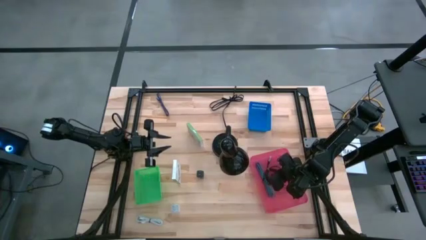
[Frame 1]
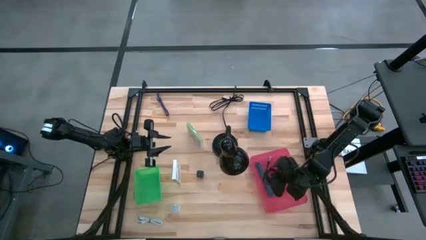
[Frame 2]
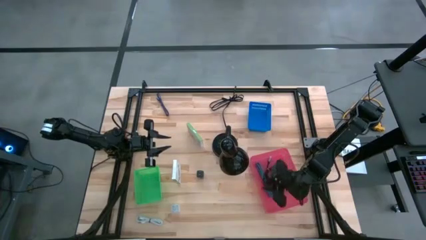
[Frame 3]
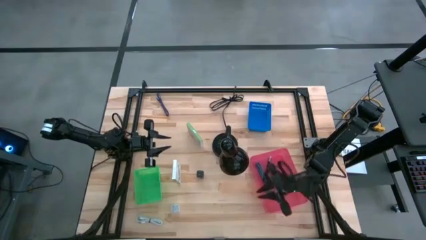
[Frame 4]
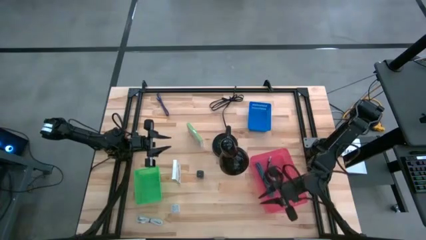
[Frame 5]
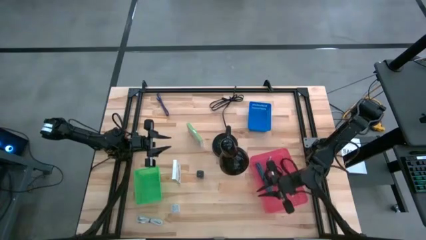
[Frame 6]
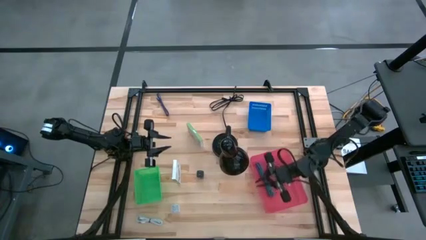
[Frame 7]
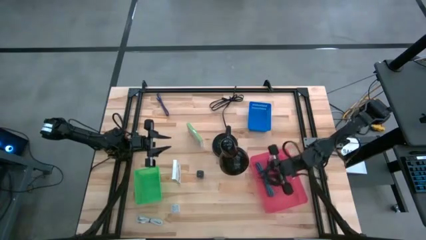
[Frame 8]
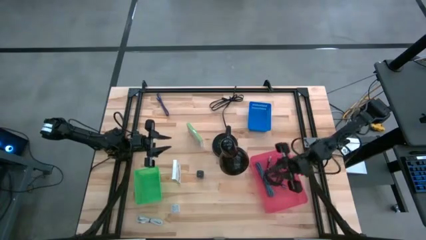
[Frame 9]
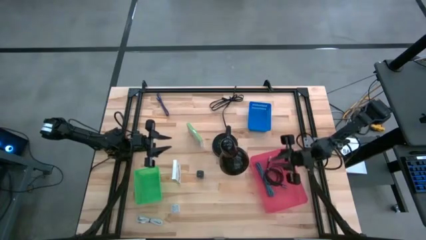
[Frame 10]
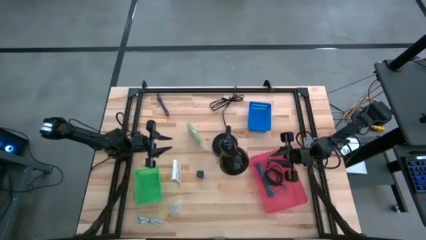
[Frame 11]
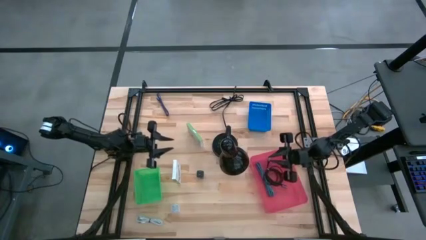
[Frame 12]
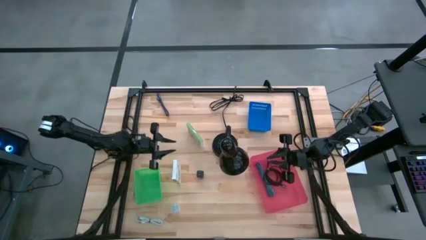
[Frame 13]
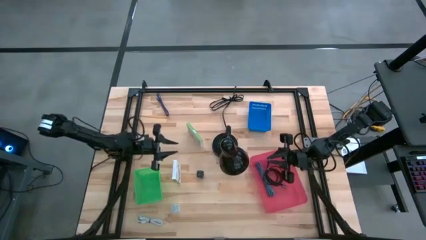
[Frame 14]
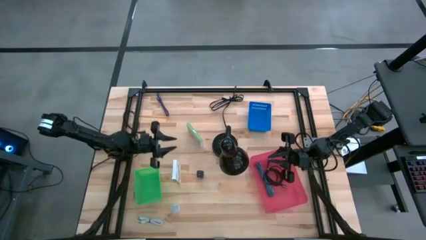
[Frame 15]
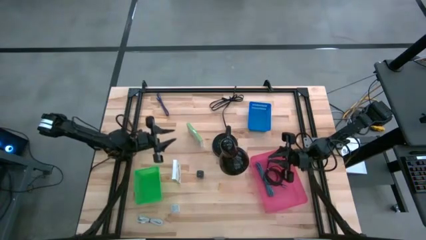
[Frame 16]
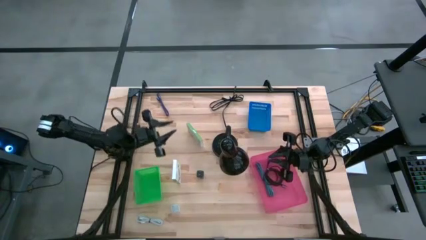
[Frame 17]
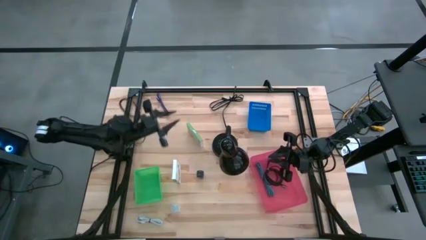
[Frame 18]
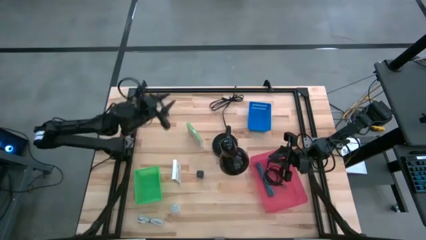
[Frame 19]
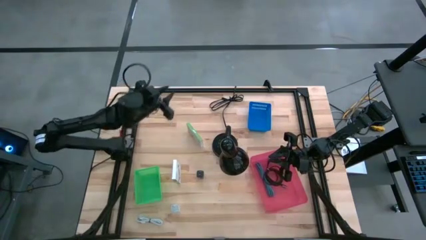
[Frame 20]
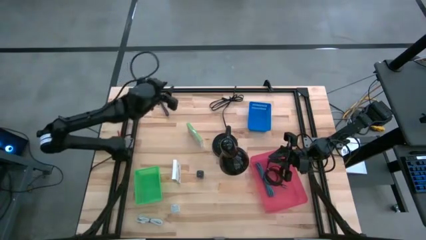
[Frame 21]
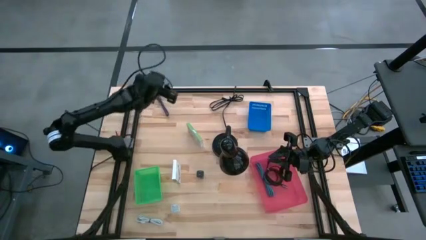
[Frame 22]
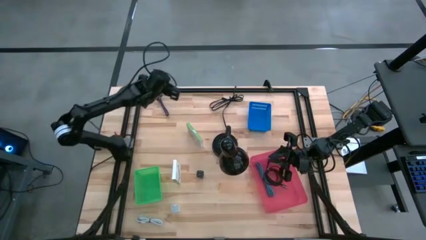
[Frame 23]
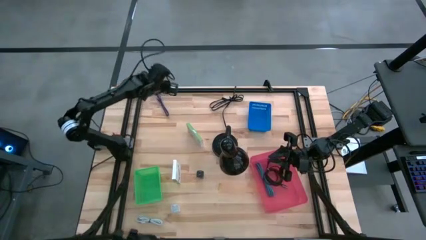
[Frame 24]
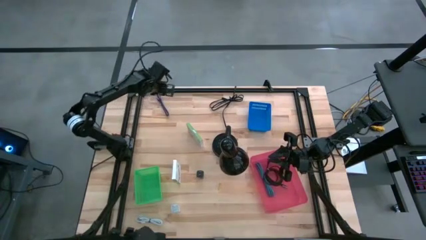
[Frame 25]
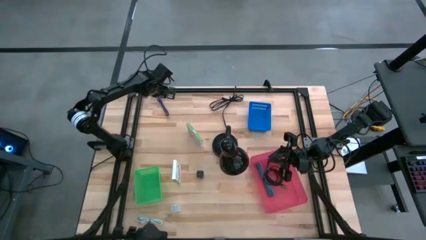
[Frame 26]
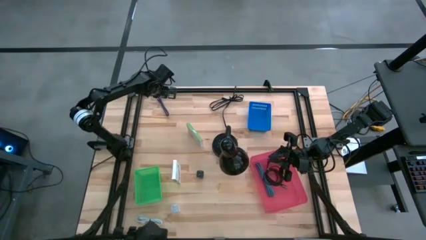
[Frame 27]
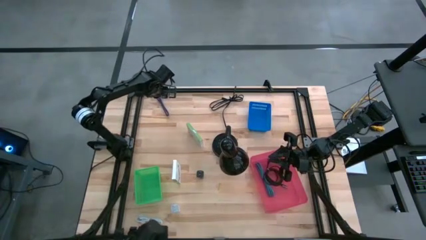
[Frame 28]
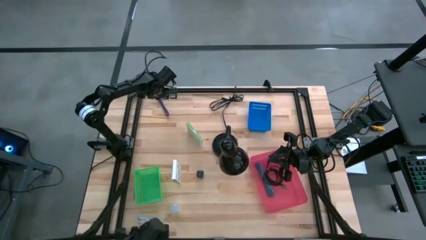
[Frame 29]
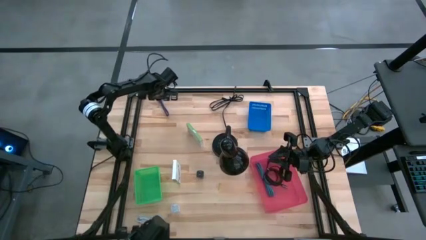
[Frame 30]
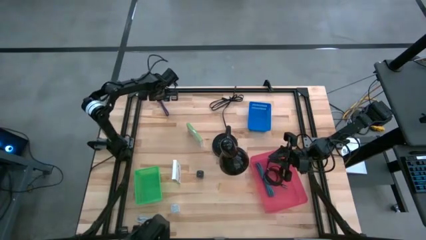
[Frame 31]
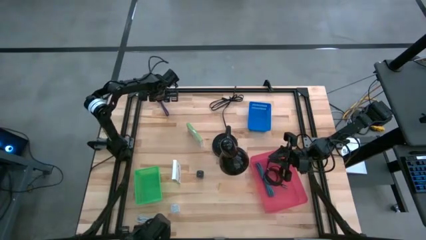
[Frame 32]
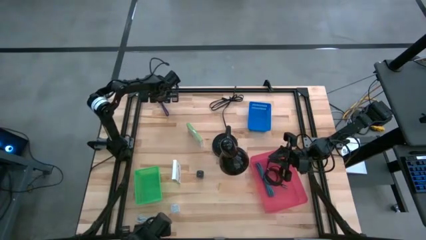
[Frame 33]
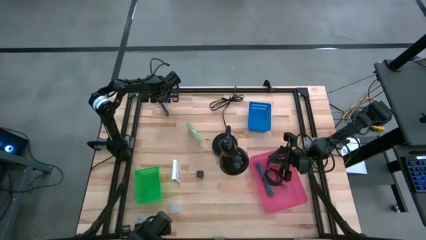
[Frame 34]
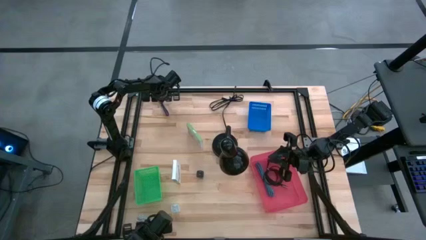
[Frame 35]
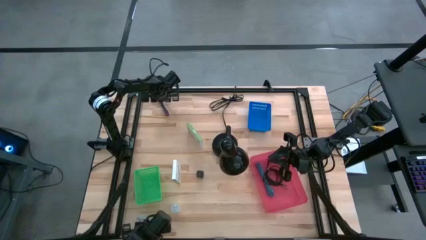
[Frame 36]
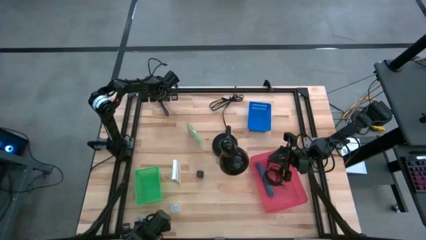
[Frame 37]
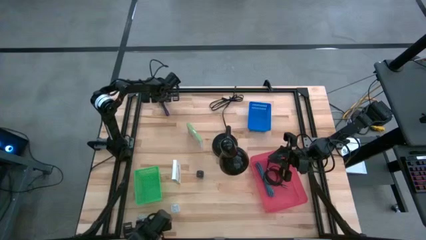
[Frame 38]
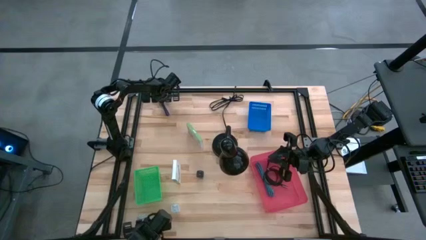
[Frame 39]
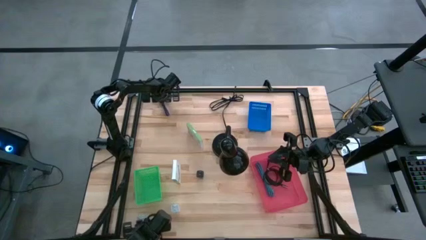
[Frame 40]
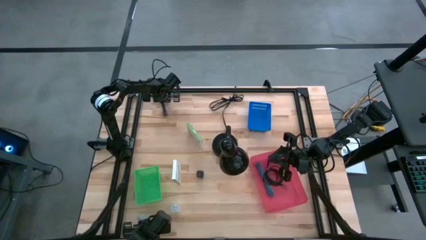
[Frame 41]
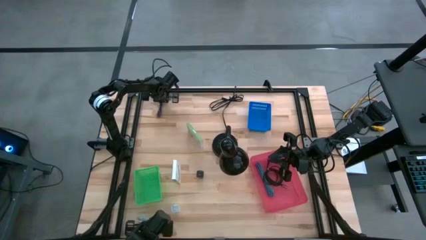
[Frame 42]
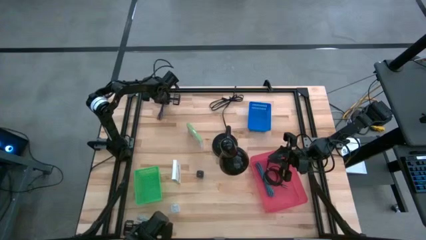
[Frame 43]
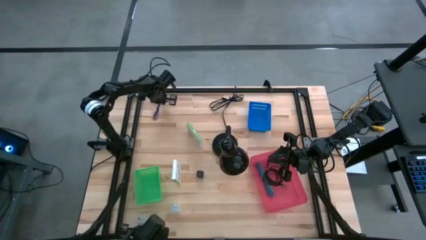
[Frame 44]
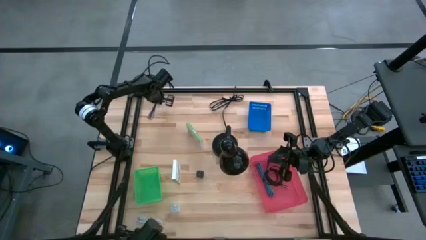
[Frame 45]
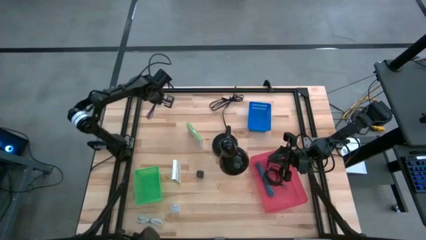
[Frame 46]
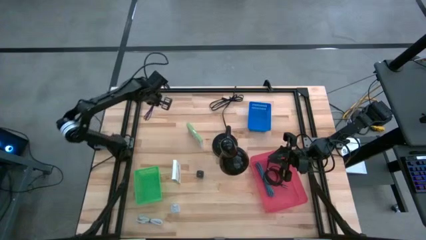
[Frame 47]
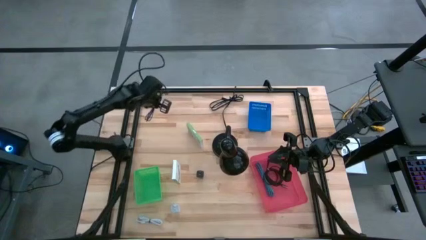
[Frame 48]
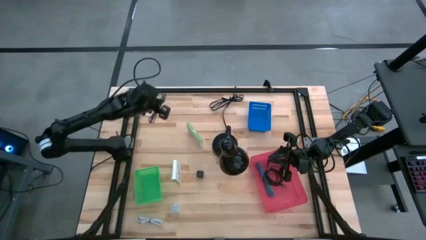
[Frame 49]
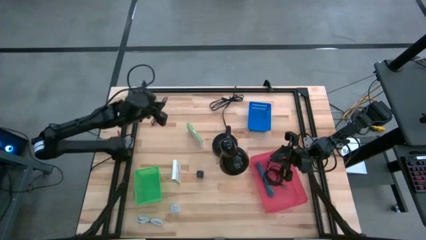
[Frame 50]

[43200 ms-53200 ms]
Task: Pick and place items into bin
Put the purple charger cable into the red bin

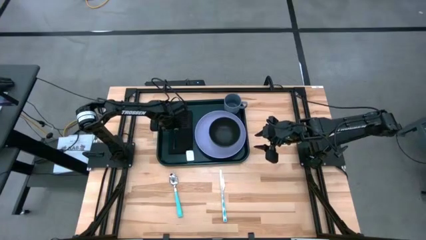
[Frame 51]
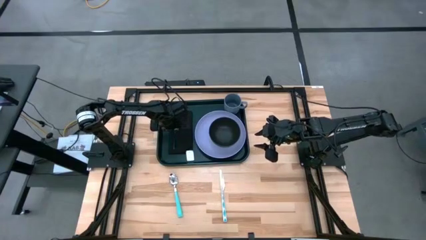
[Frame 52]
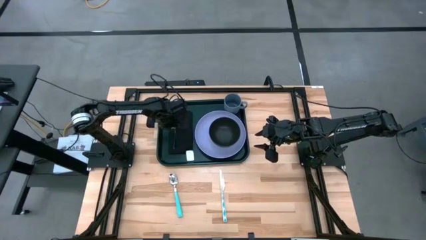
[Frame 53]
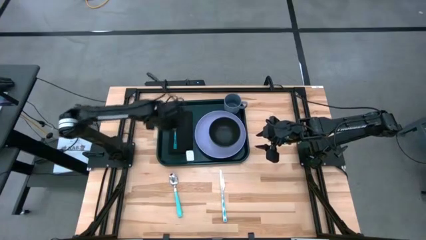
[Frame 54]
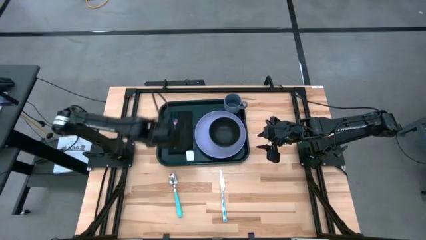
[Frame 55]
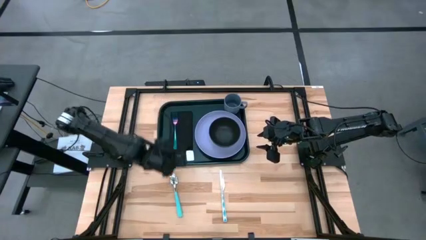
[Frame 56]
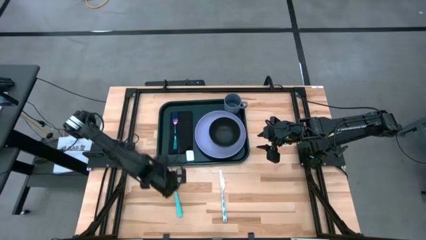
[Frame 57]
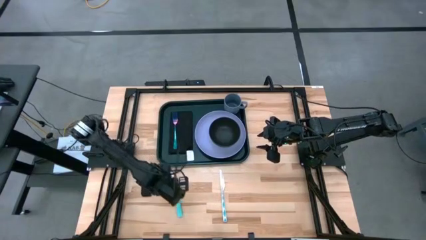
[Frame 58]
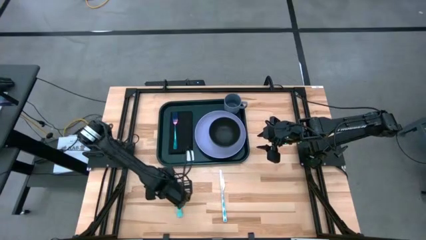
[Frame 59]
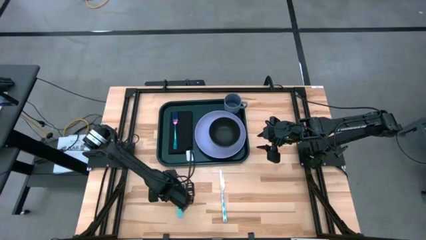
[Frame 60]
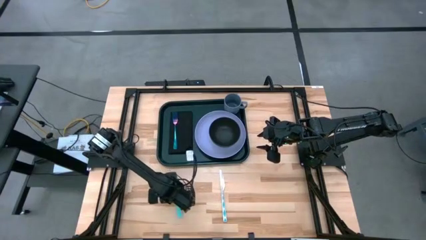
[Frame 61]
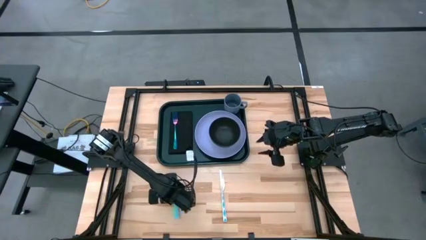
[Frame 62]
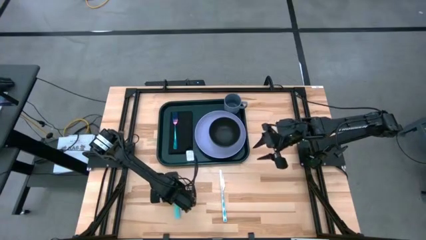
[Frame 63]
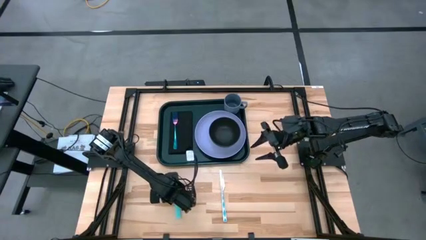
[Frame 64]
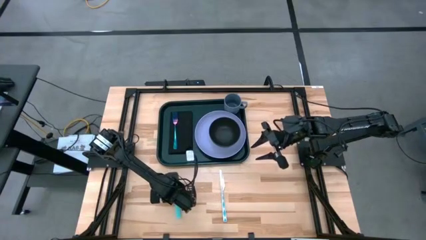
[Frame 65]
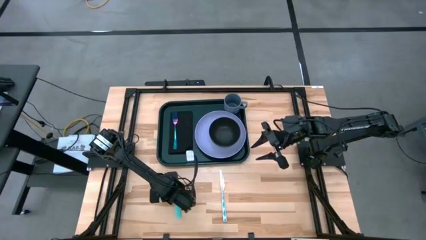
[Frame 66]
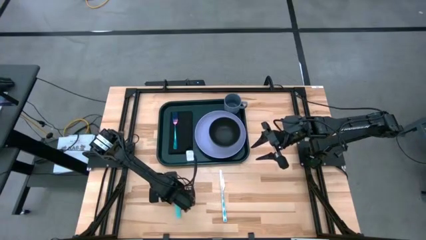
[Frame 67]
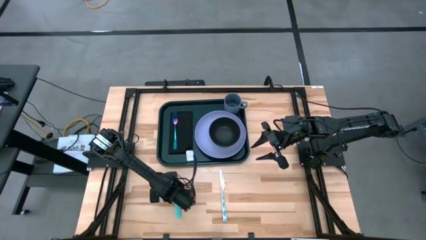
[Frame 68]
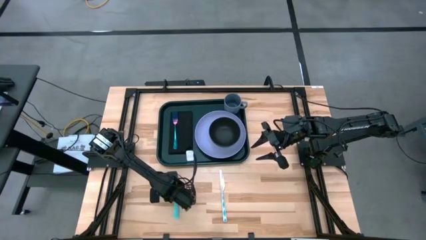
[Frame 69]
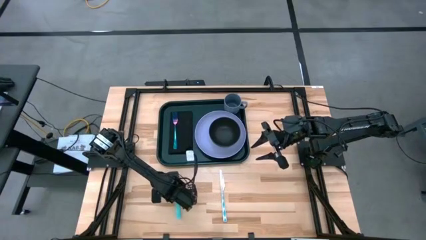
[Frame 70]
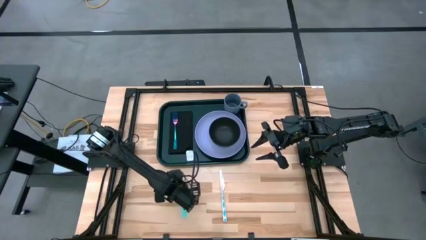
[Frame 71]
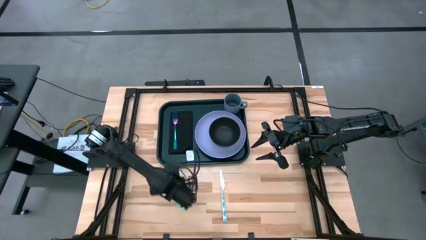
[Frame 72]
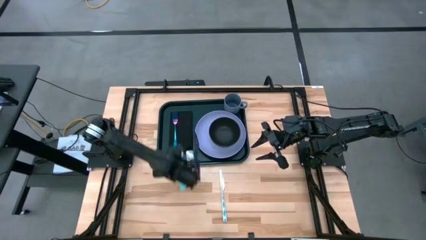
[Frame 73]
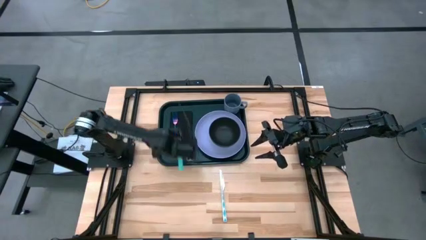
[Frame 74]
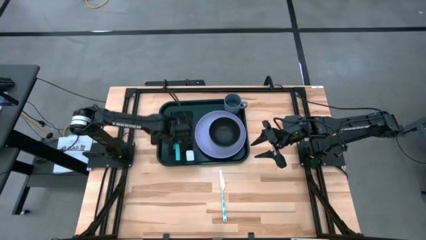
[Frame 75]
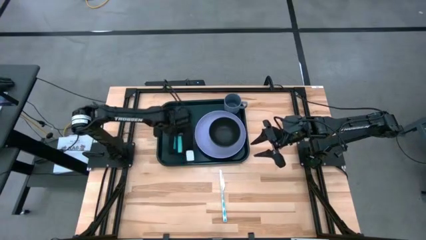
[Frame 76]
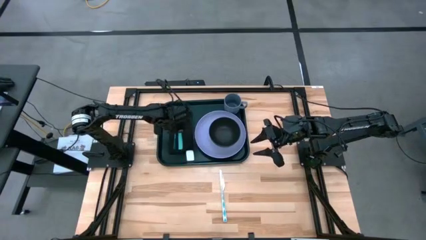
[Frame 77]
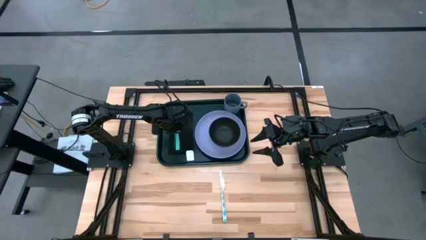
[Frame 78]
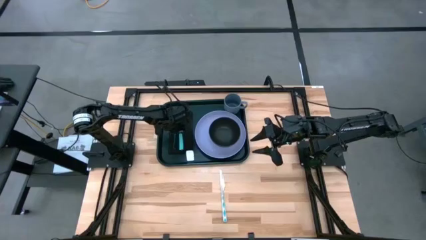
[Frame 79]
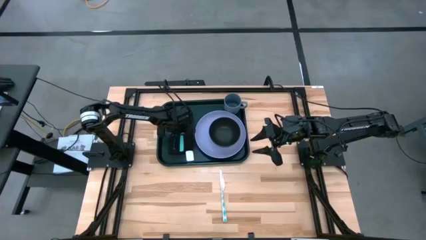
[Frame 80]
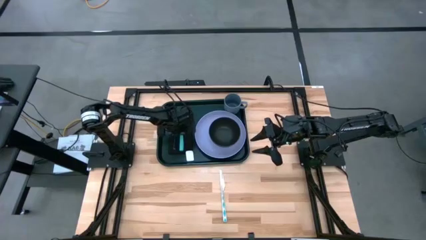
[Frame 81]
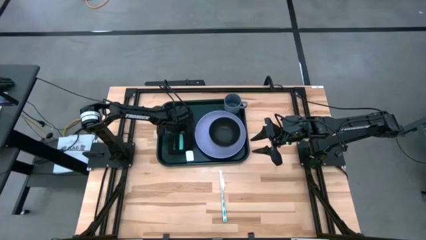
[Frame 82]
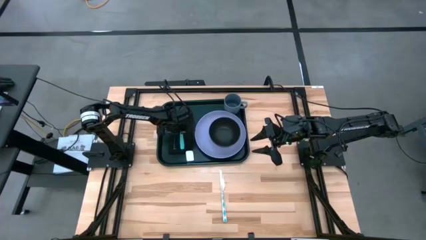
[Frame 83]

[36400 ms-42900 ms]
Task: Set up tray
Put the blue spoon on the black napkin to the right of the blue fork
